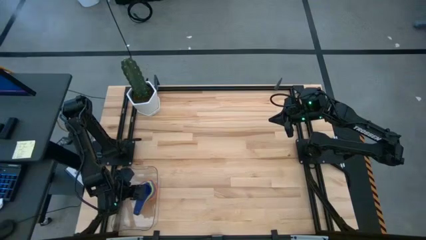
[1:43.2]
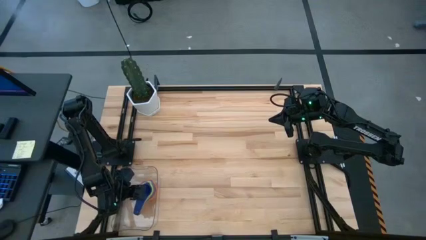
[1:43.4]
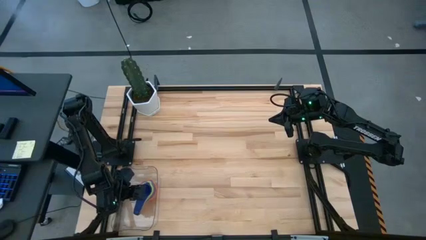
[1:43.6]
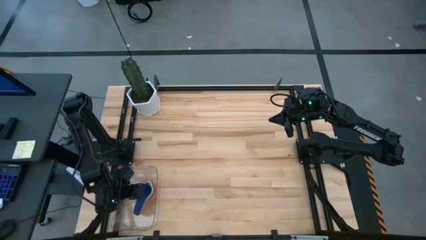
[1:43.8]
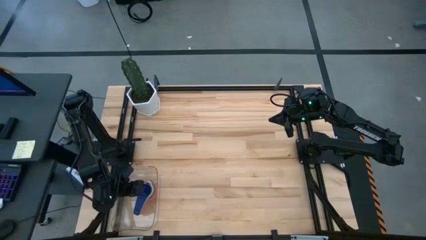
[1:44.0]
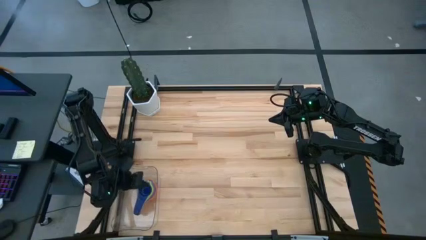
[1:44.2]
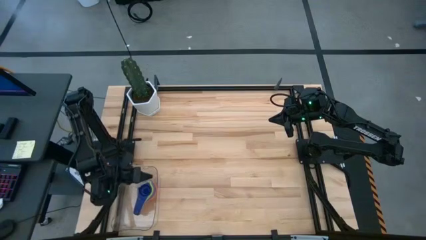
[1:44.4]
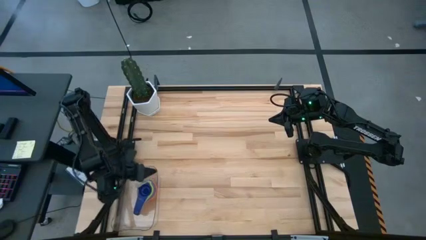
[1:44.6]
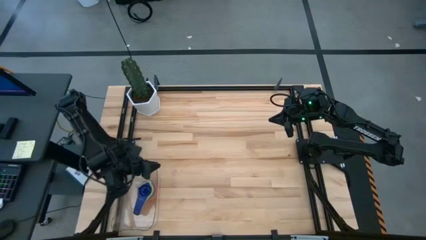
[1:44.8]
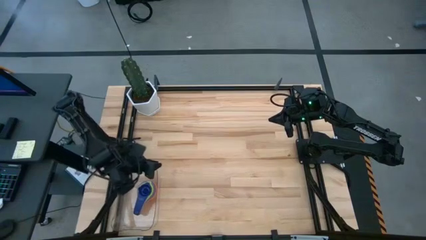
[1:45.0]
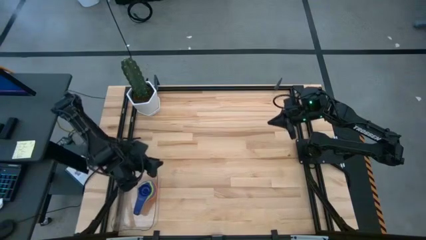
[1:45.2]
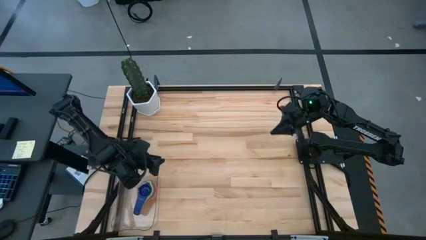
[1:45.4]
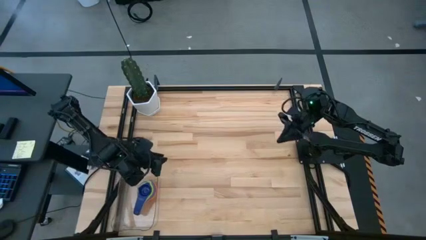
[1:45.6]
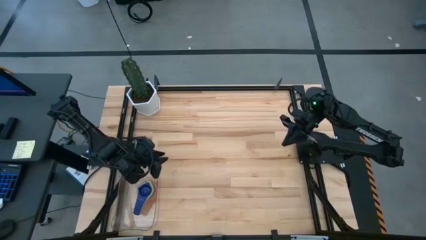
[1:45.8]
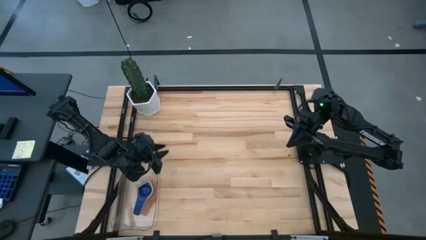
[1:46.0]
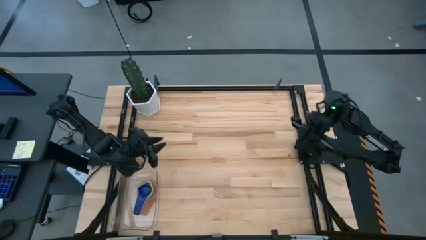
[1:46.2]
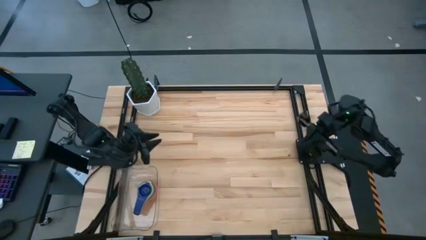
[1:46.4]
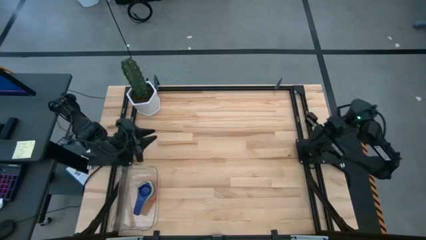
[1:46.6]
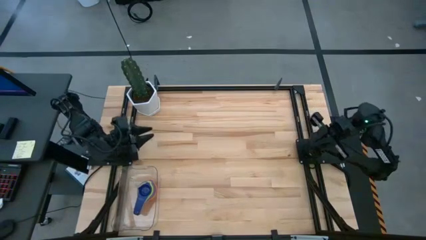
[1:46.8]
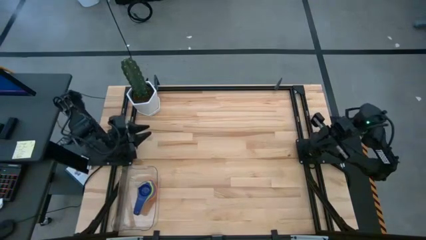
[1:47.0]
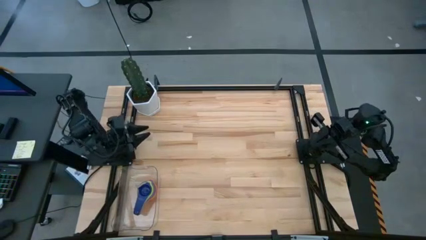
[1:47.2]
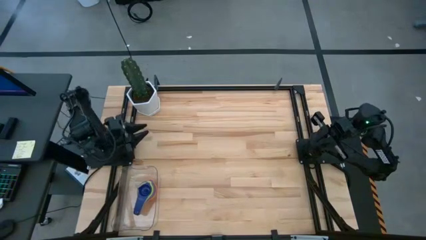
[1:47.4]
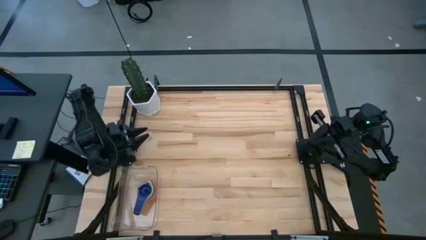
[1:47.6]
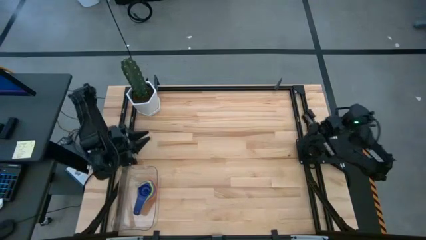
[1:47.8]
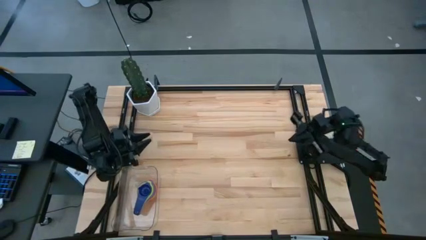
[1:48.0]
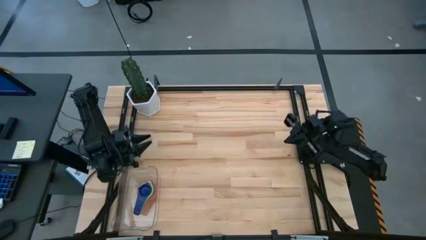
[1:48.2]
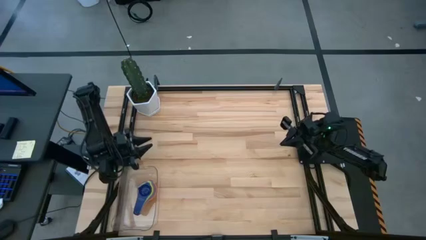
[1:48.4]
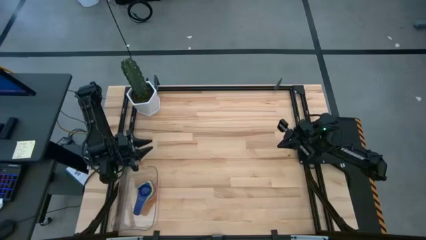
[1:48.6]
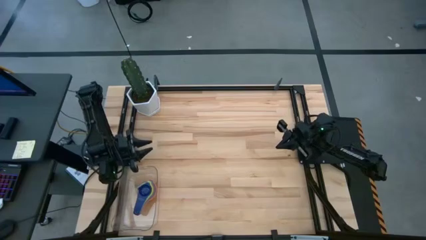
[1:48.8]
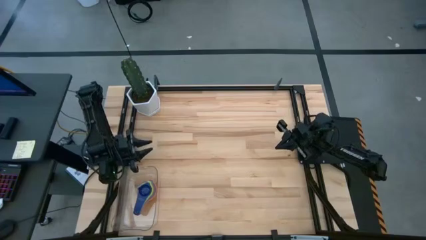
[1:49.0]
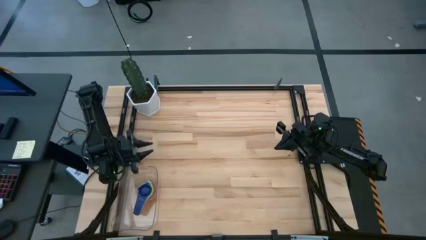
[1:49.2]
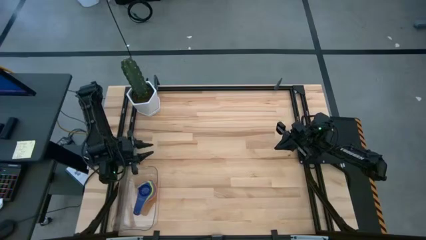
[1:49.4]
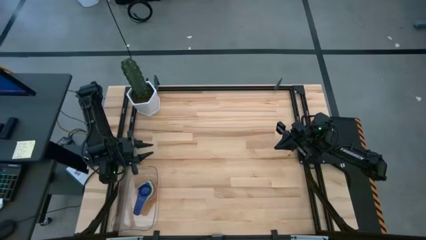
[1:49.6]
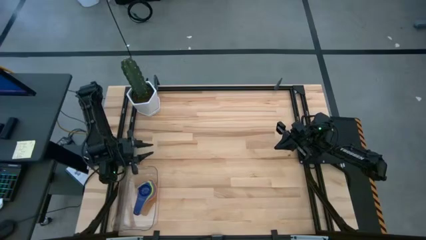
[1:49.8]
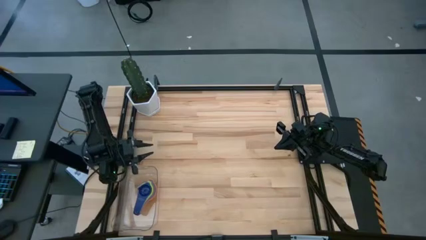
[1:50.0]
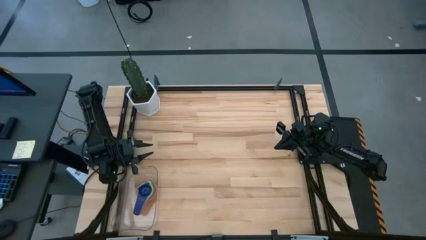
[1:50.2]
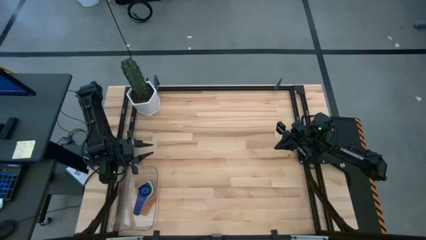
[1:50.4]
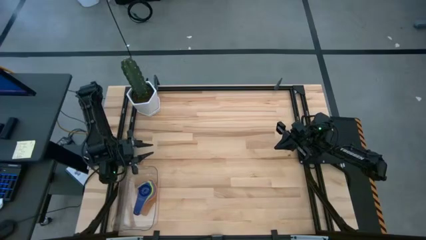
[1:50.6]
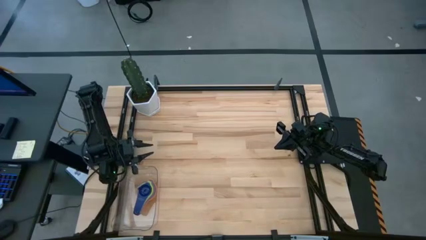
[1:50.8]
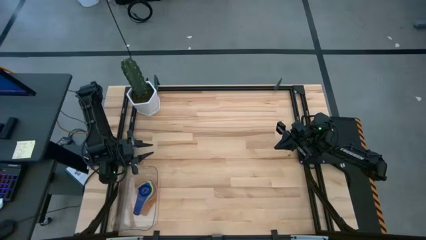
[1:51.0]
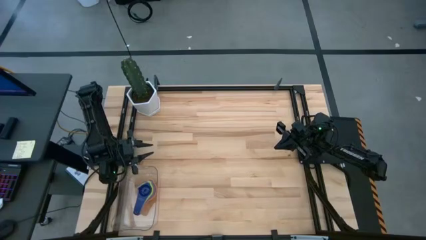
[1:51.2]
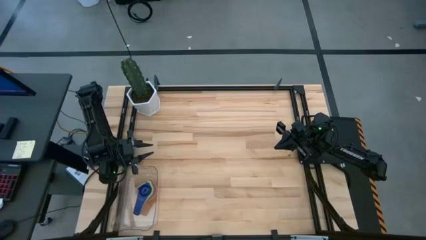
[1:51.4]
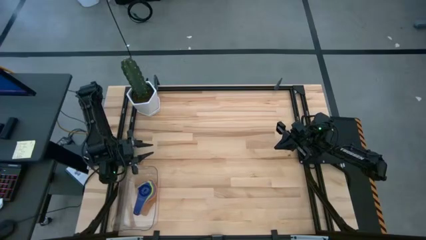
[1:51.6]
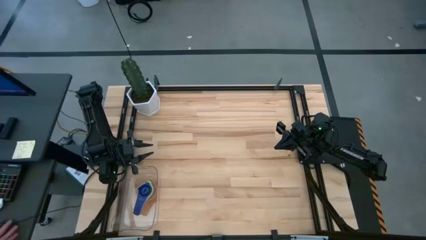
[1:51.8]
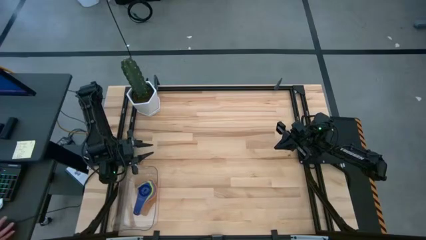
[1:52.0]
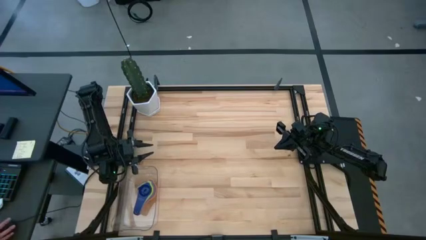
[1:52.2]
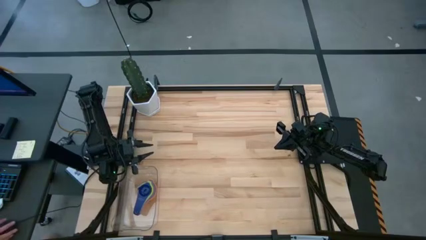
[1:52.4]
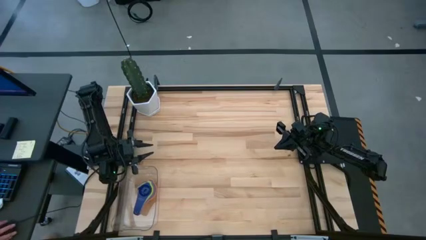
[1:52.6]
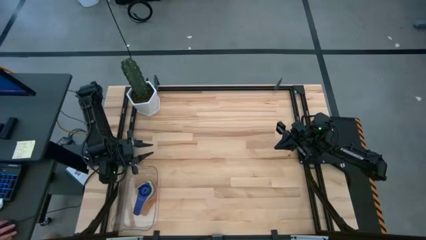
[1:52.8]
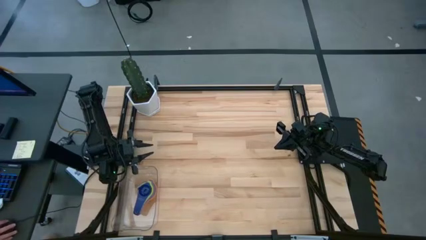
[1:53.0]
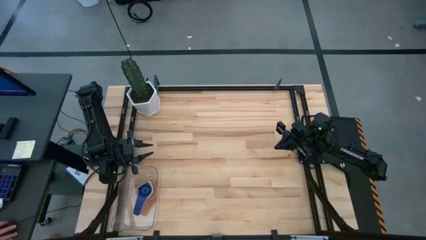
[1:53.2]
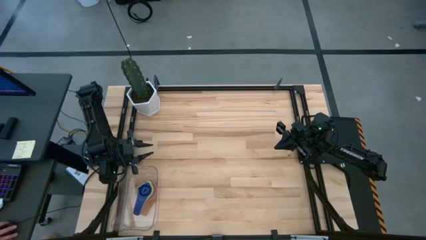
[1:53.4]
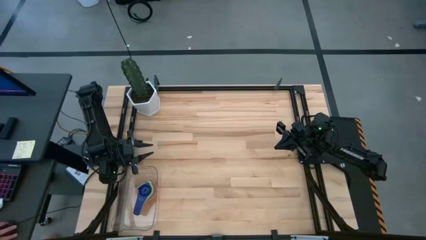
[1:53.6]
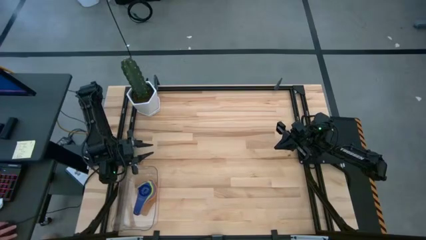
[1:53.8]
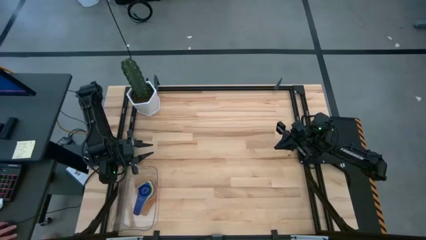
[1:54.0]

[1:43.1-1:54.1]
Task: Nest measuring cups in basket
Return to Home Position
